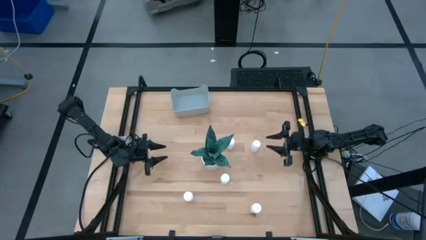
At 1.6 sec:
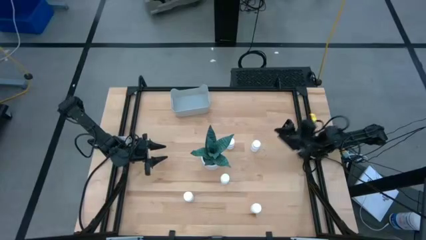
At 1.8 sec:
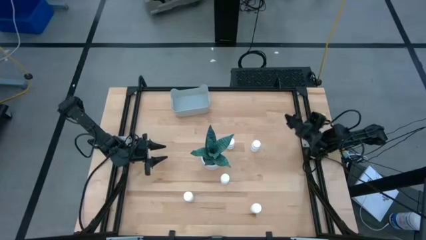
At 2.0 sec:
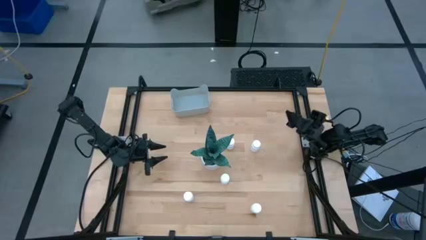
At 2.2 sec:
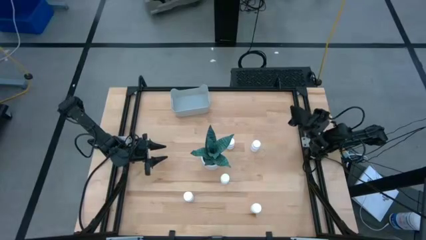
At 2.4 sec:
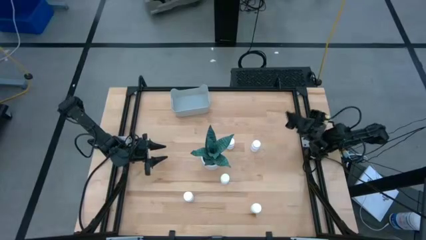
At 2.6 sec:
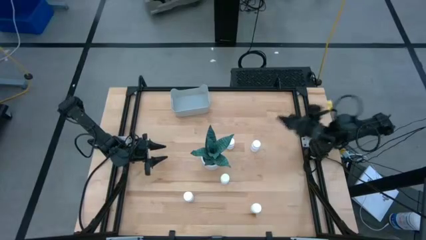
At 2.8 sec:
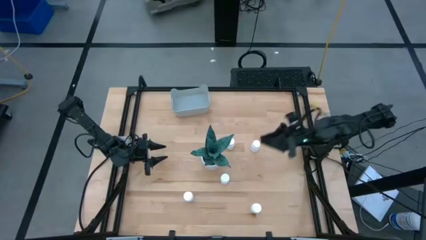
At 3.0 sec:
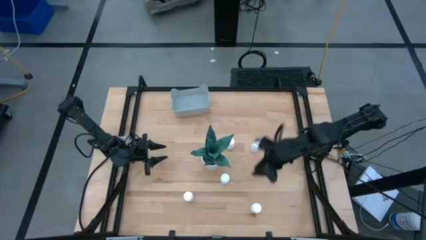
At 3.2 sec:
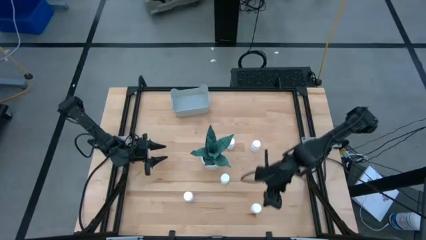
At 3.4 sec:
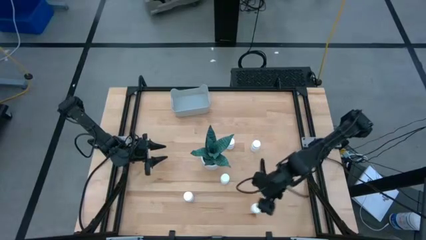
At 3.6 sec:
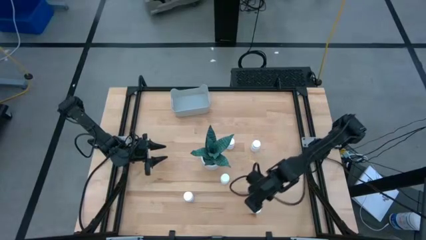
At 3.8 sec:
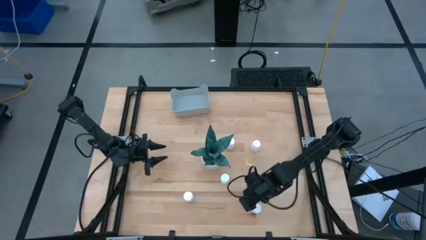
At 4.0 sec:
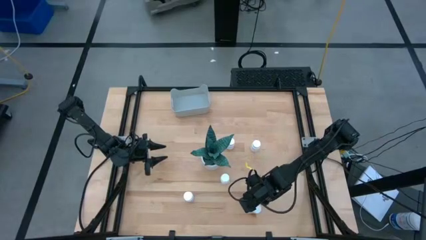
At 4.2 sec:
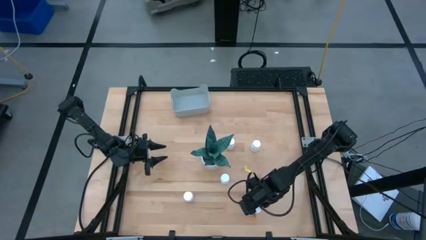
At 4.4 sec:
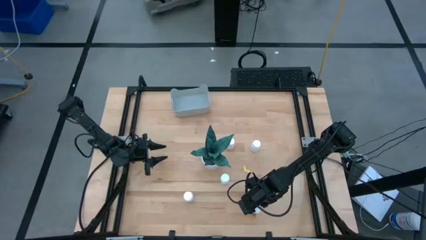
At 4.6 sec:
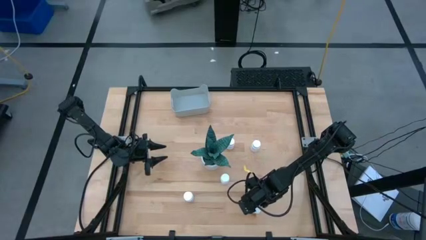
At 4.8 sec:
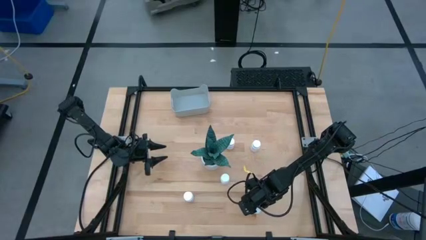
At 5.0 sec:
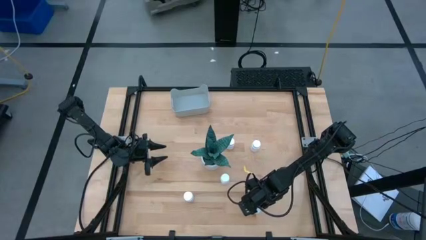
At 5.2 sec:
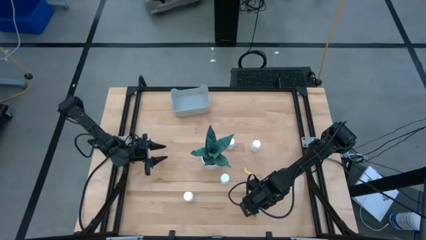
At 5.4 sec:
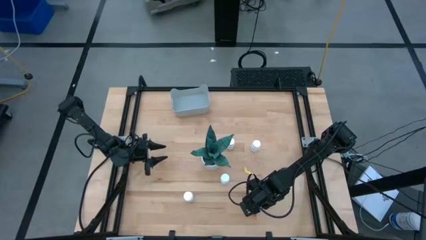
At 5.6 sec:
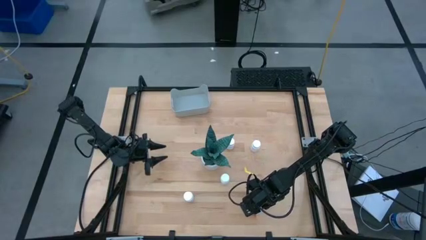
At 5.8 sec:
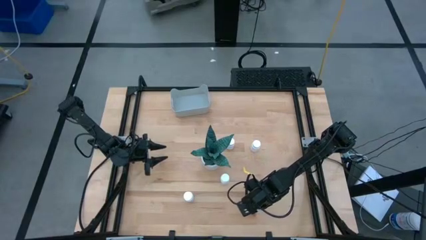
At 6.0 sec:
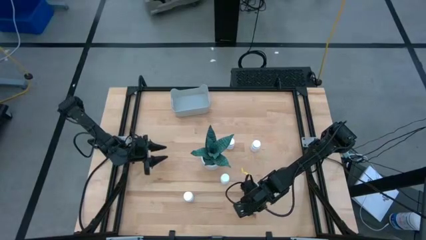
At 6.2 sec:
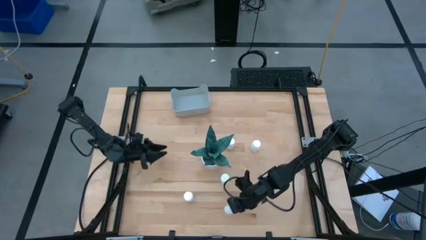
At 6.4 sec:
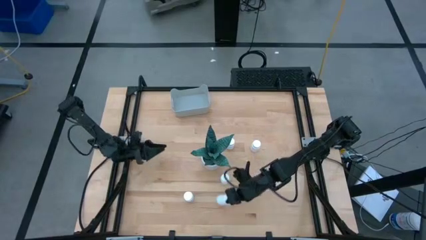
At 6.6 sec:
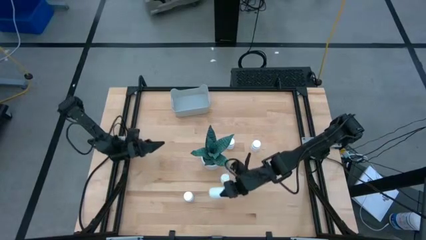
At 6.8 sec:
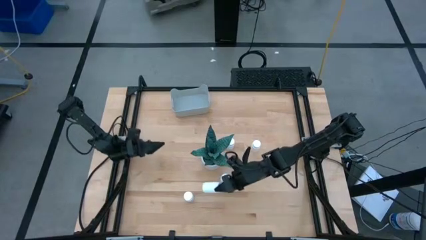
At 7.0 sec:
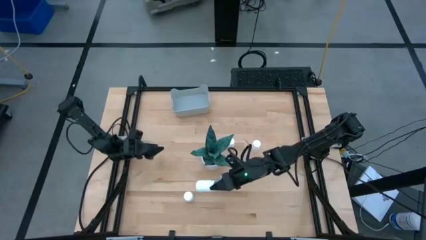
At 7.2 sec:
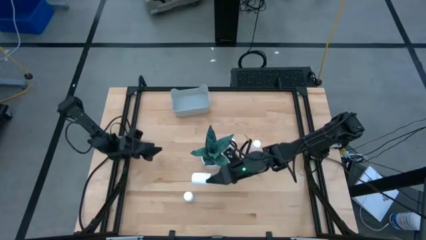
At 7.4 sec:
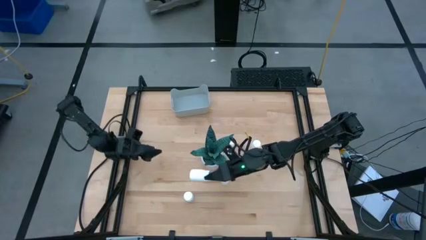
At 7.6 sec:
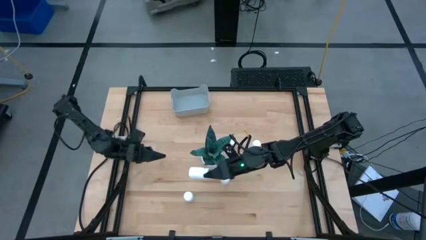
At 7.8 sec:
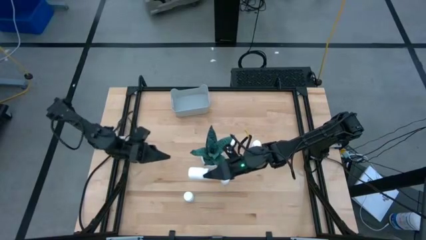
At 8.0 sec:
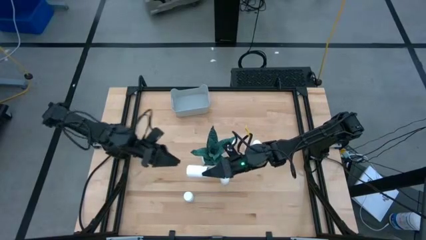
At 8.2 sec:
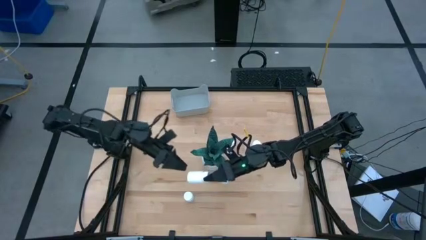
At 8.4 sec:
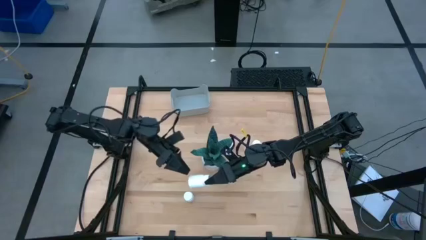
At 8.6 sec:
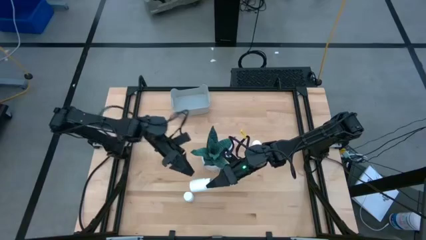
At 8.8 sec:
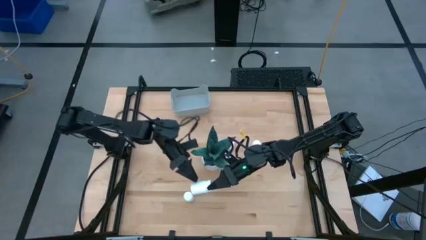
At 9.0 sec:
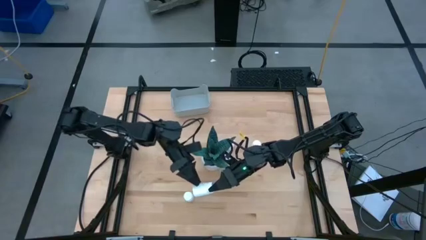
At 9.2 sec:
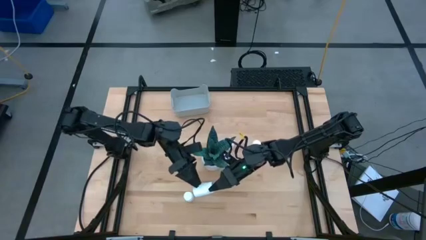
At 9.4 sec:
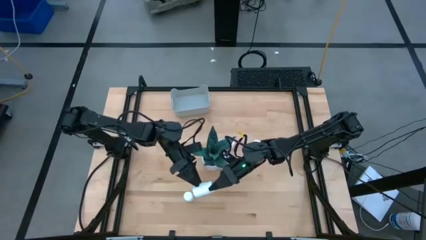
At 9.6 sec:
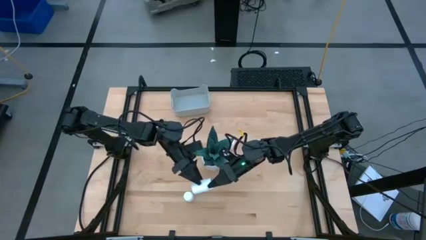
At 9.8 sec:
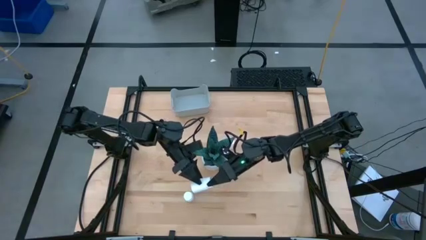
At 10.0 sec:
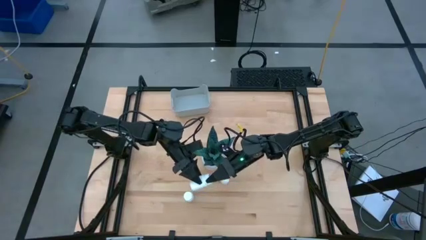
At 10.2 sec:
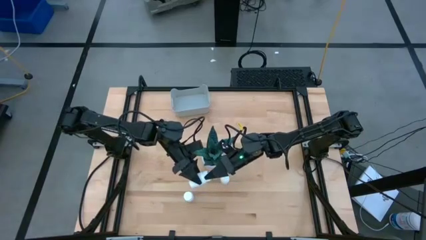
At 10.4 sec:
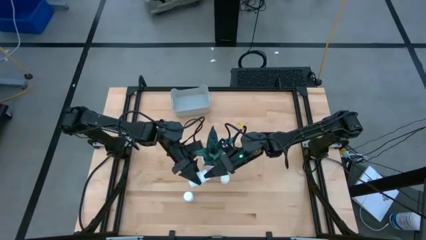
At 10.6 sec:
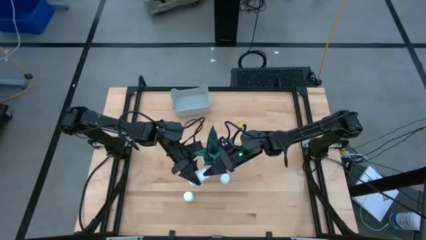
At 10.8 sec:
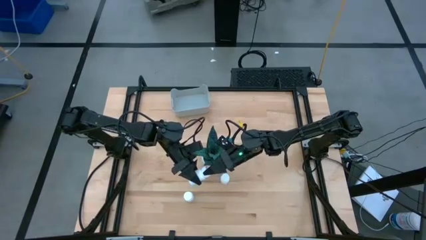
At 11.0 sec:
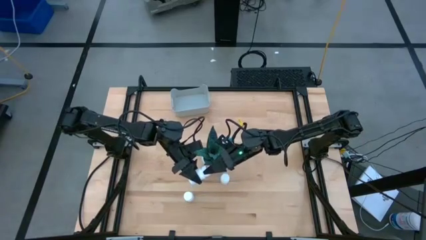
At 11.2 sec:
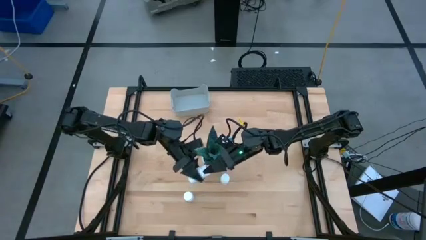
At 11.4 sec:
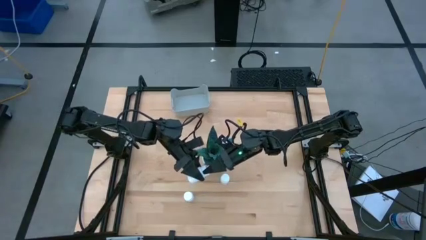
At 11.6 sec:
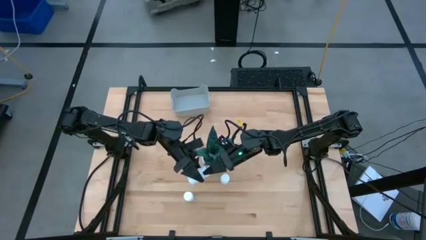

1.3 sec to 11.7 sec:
Task: Pick and place pill bottles into a basket
Put the white medicine bottle into the gray bin

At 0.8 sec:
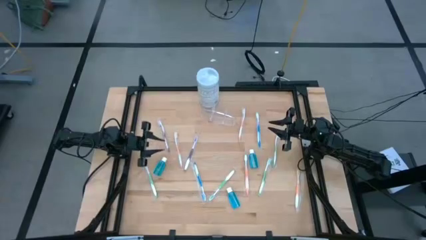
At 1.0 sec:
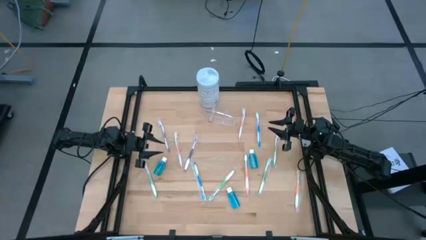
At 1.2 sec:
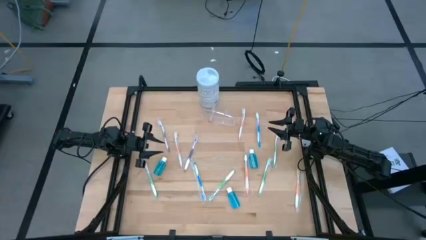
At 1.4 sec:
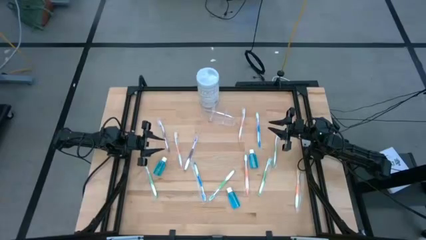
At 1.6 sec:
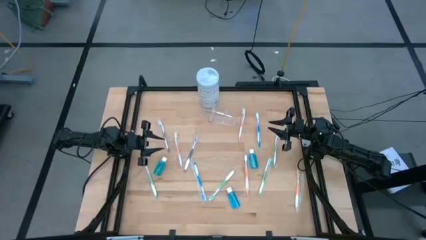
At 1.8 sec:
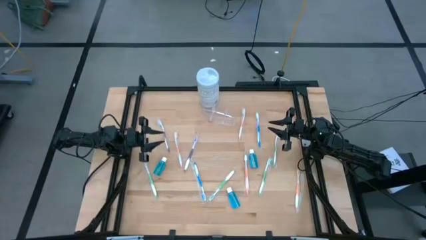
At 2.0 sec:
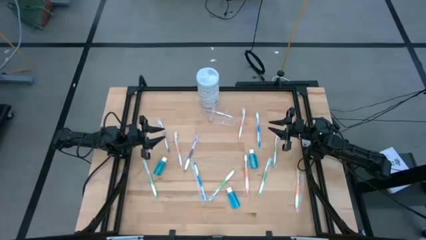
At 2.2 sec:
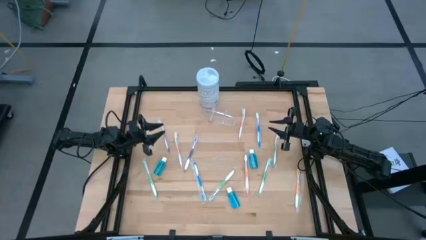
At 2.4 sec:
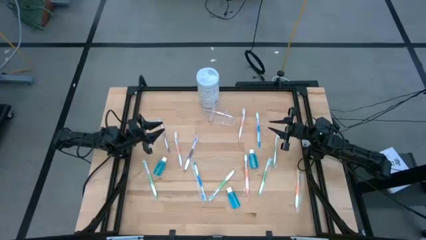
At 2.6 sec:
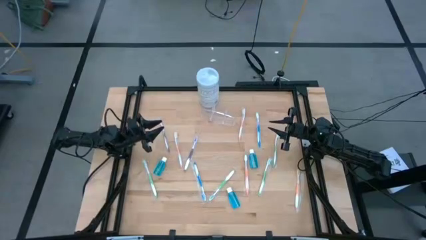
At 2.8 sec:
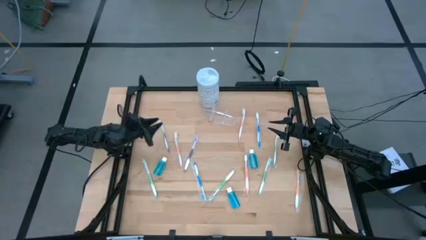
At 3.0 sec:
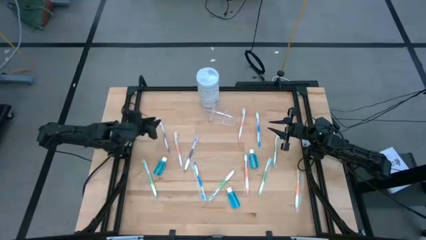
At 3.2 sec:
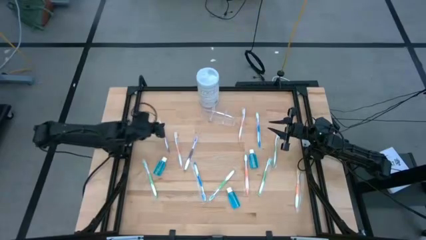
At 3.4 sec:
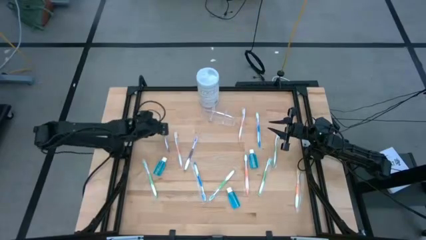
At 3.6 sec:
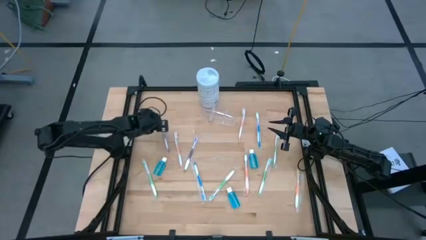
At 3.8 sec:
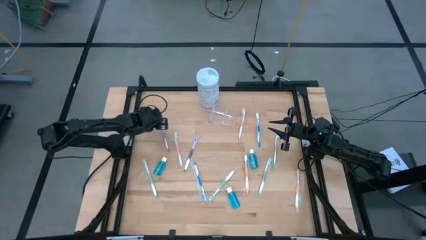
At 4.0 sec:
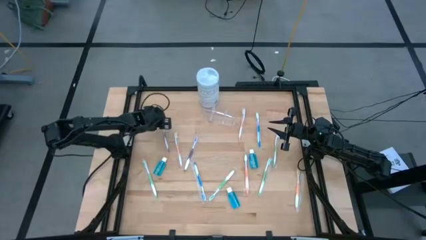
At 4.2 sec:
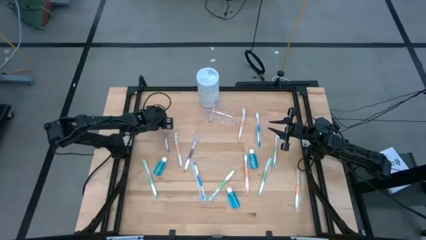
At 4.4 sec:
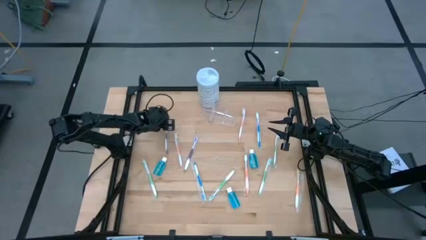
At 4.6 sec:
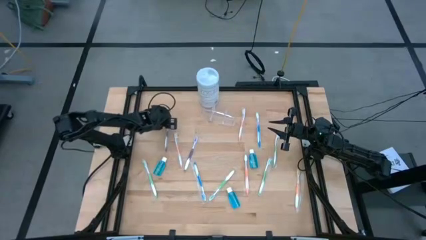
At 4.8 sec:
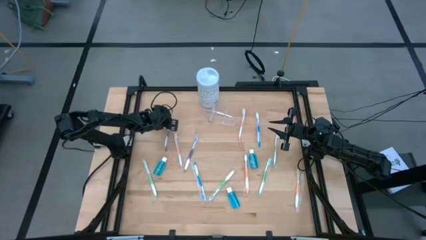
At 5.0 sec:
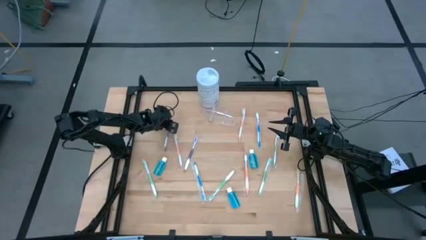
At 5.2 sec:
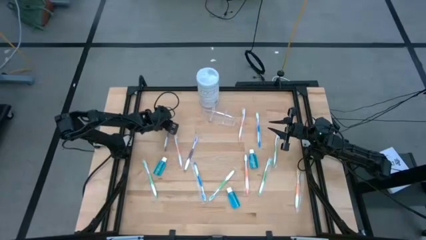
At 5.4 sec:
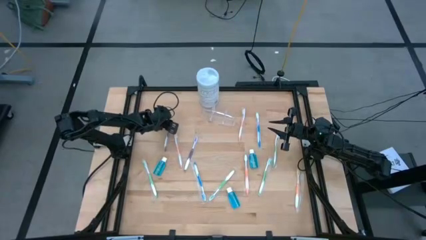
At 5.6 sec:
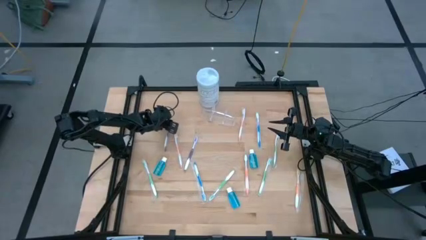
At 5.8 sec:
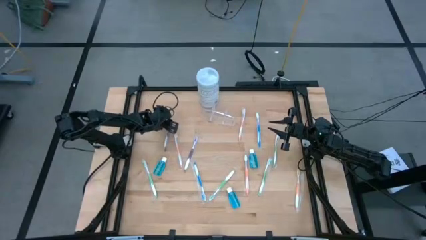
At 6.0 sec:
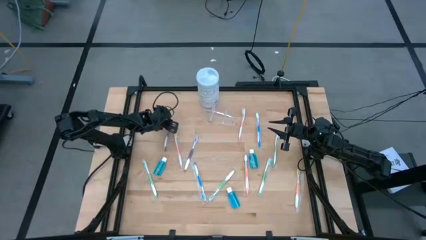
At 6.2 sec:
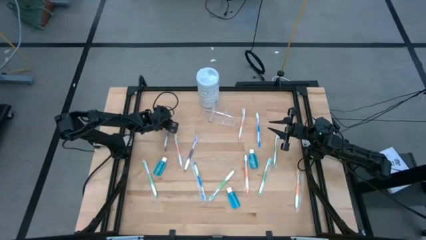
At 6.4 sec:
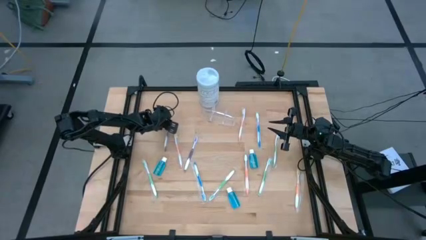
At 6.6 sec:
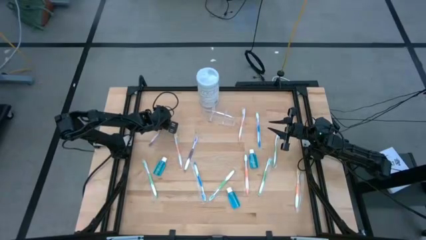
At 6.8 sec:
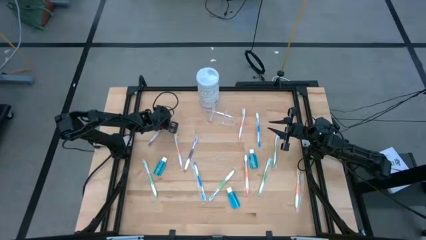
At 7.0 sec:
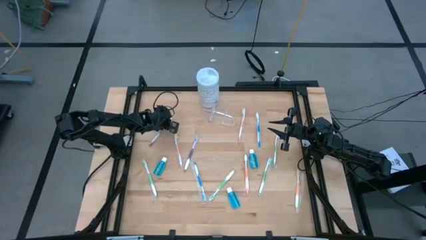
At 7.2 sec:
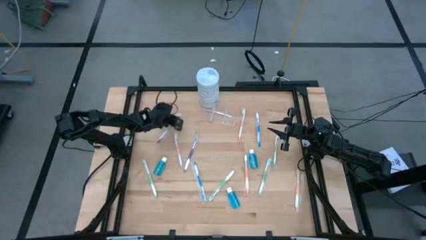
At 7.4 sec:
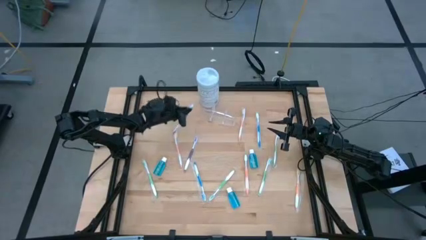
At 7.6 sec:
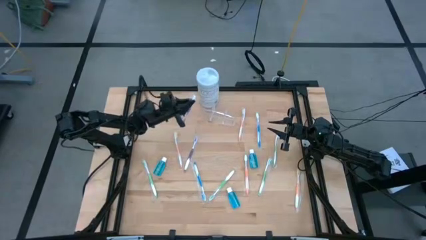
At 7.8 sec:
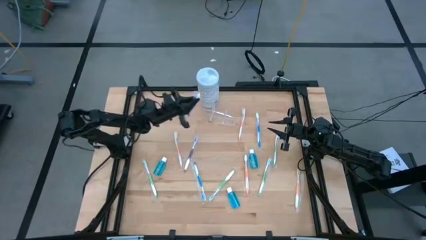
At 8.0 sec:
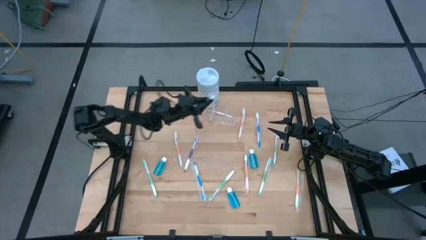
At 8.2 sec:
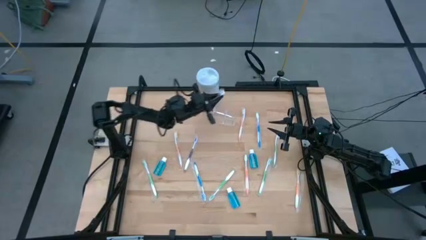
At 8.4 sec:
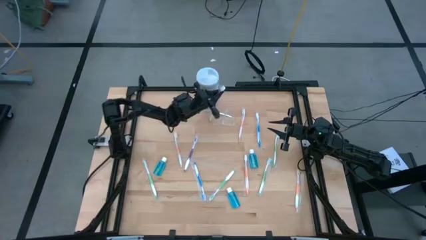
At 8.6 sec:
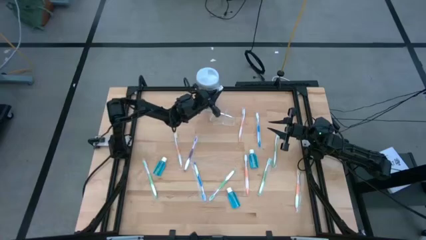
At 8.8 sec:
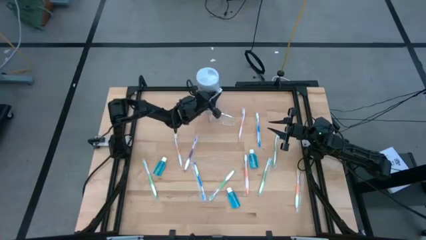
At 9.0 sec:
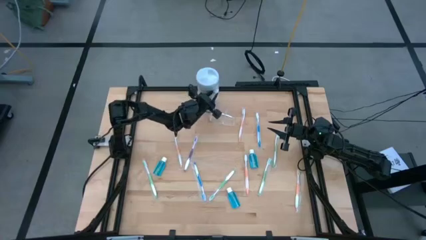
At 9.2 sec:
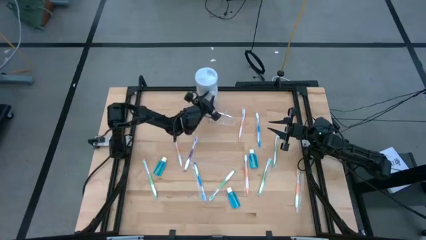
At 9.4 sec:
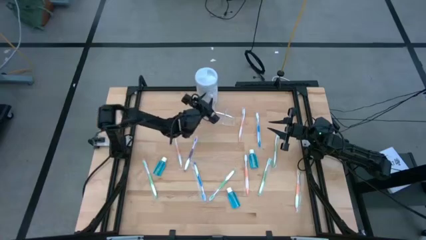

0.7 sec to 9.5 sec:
Task: Pick & Place toothbrushing station
Put the purple toothbrush into the transparent organizer
